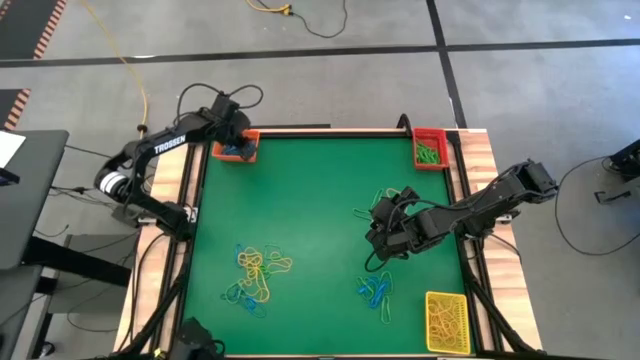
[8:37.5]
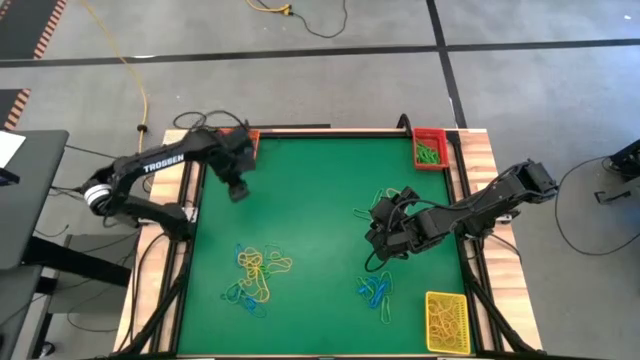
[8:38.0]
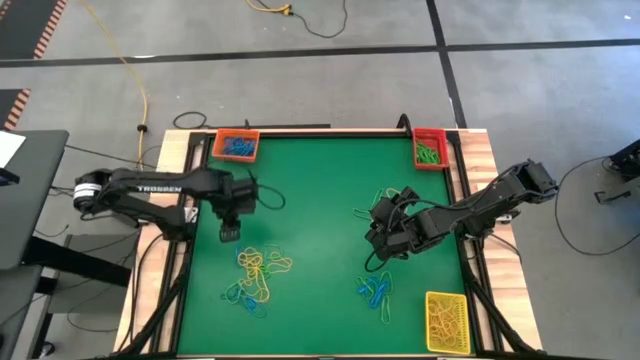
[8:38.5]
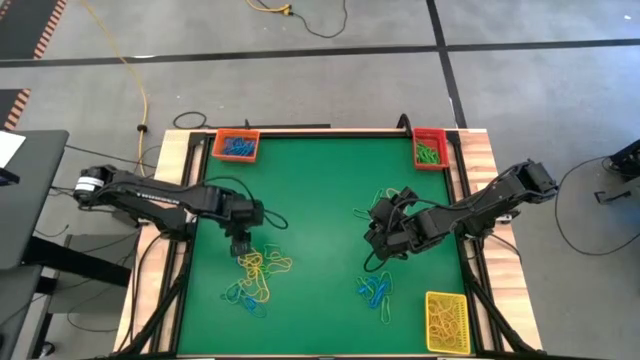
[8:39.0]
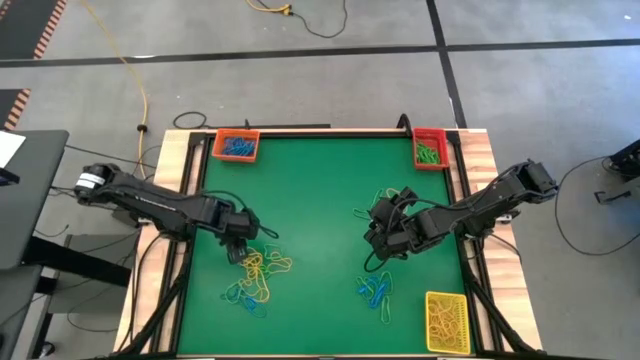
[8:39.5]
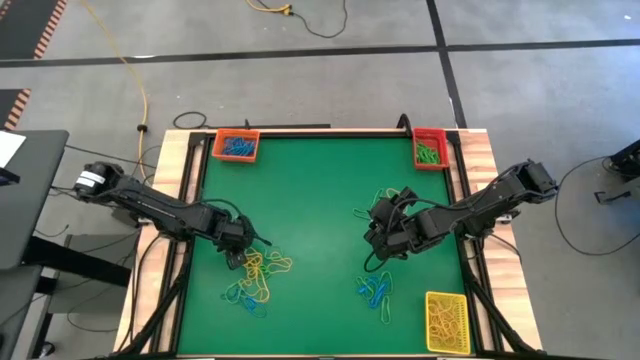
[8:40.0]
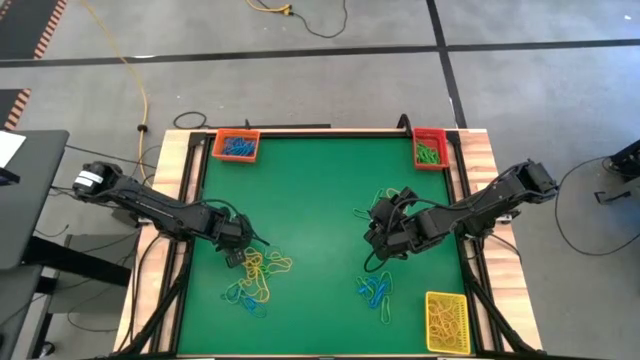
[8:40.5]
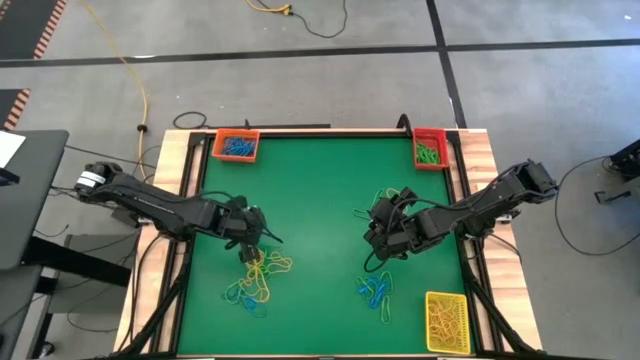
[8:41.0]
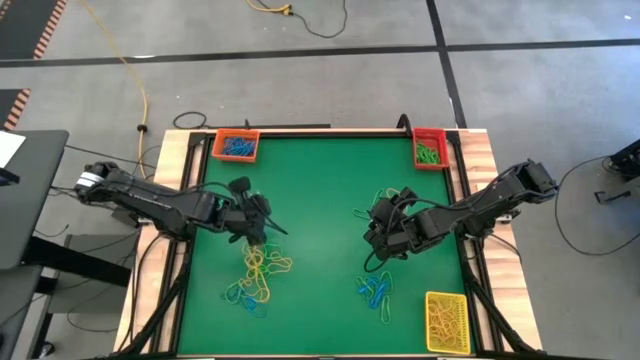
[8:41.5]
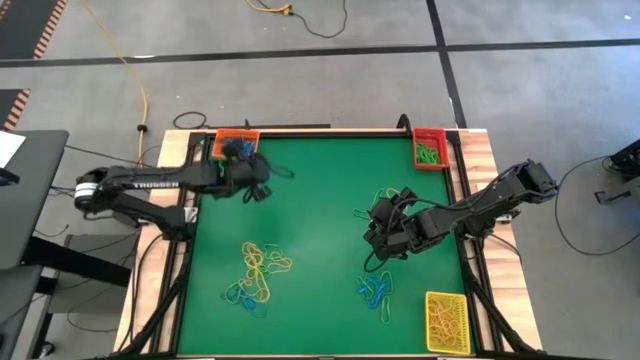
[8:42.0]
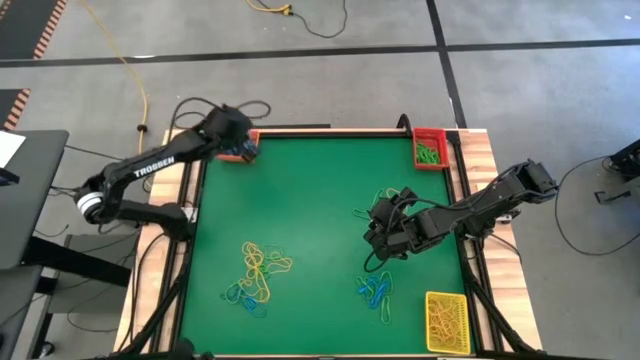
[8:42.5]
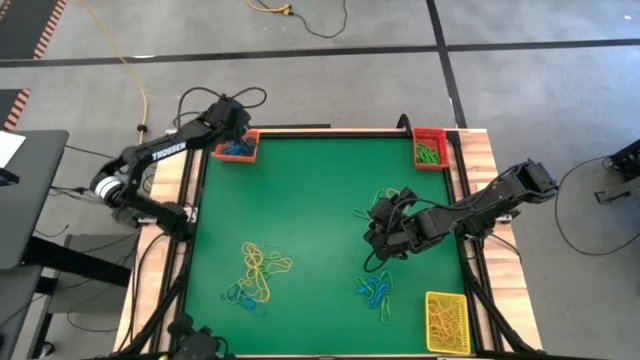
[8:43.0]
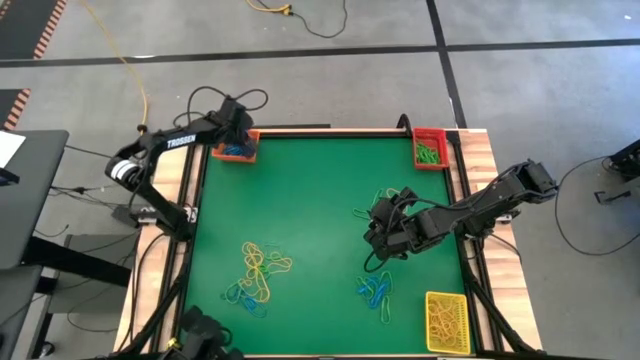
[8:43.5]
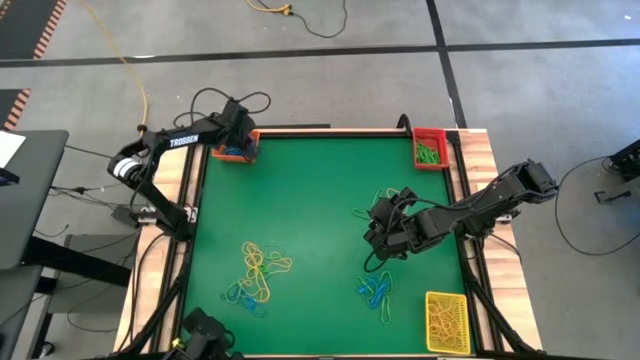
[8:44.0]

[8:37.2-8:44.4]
Task: Sort rubber bands into baskets
Put the bottom left blue rubber band into the orange bin

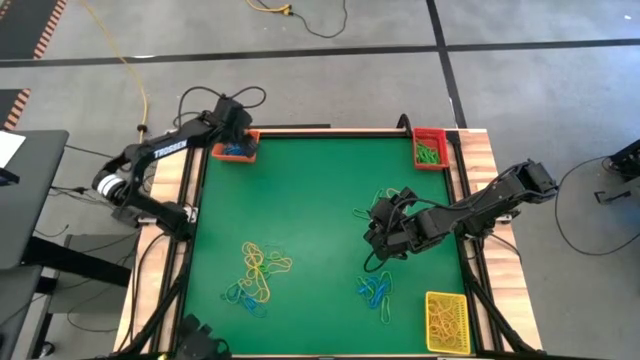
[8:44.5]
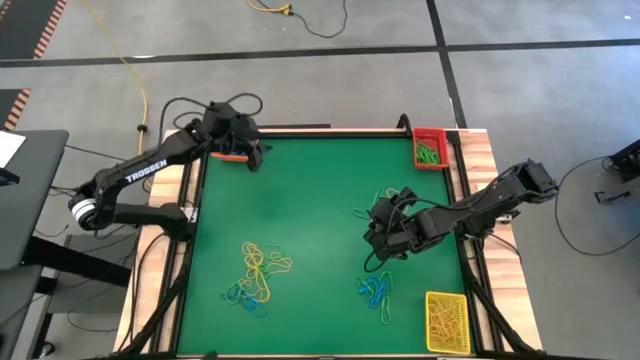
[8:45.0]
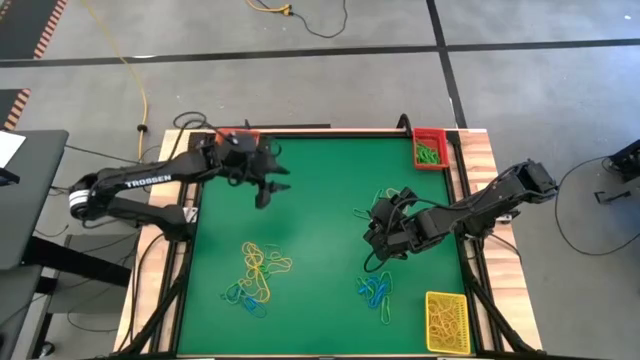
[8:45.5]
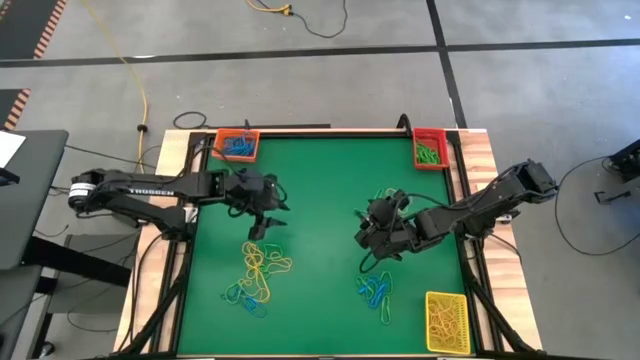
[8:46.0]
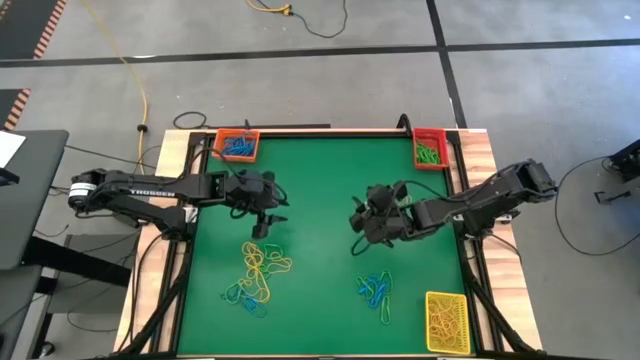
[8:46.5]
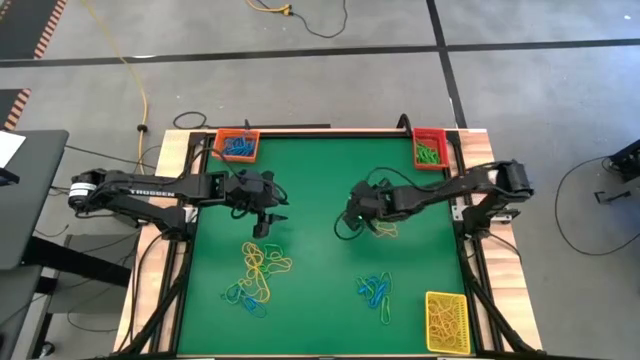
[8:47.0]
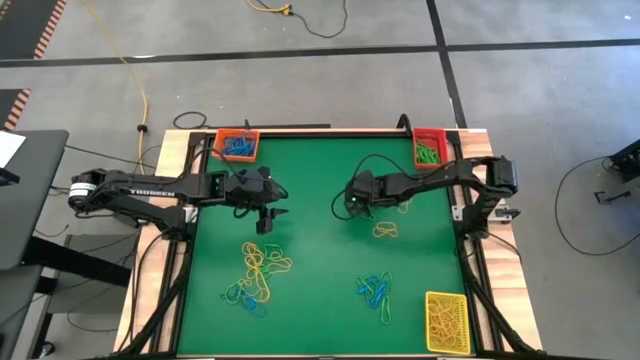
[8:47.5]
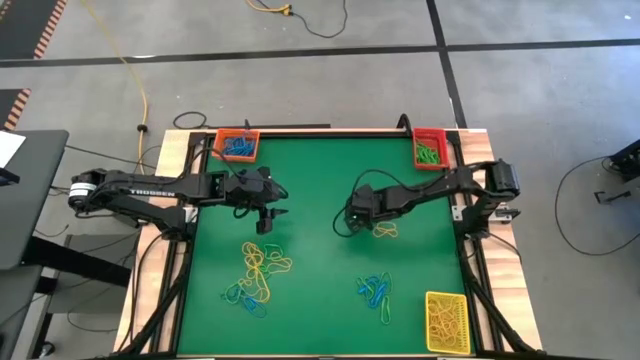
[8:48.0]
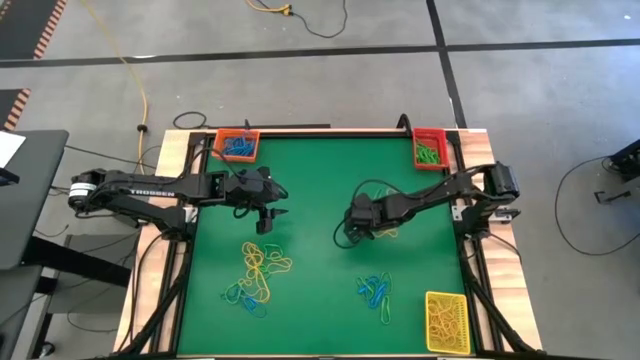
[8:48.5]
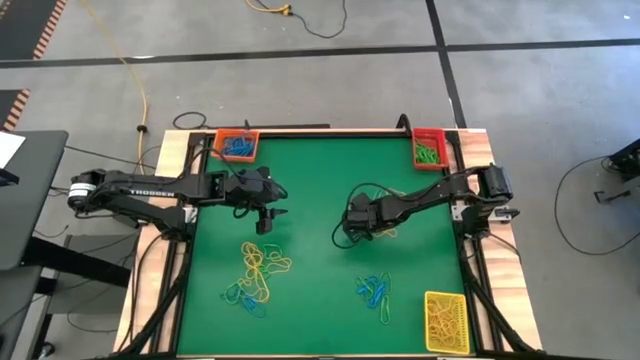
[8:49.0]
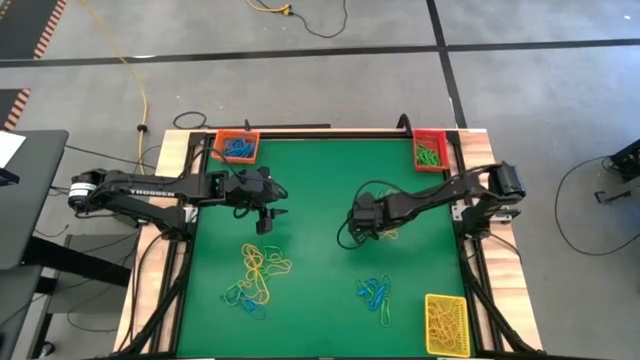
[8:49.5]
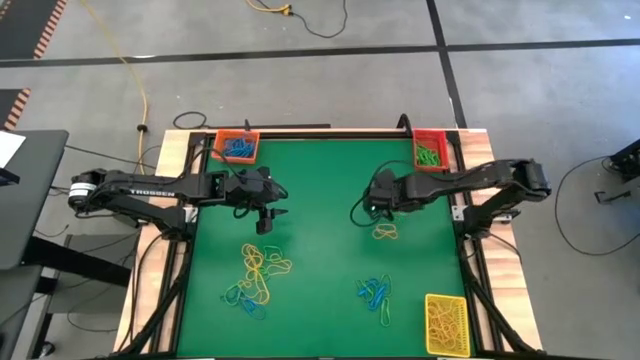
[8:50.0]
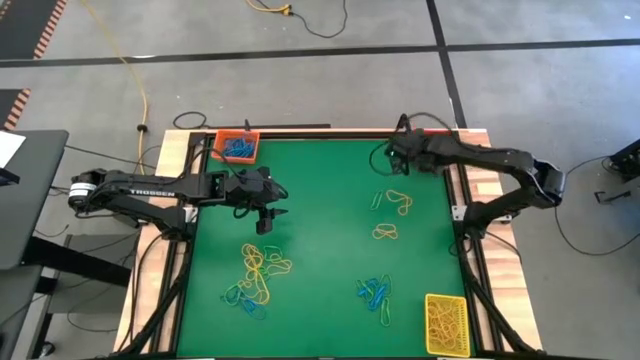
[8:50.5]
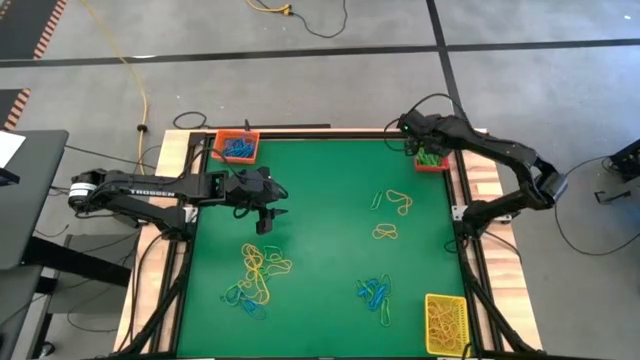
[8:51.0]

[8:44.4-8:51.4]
Put the top right green rubber band into the red bin

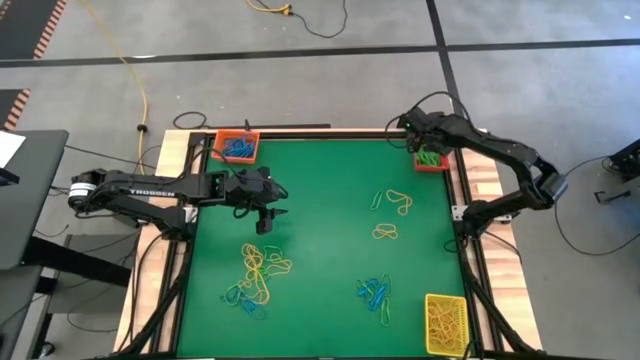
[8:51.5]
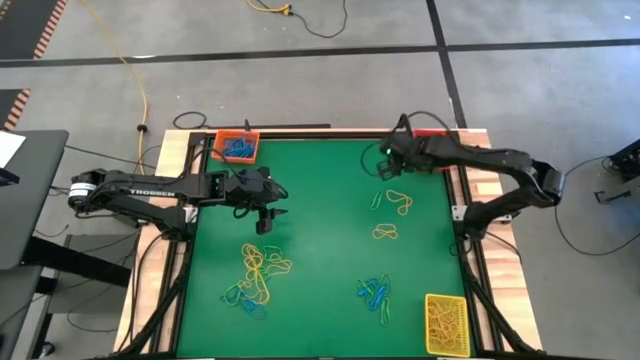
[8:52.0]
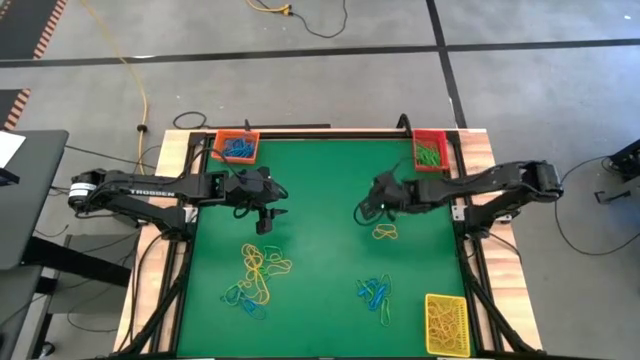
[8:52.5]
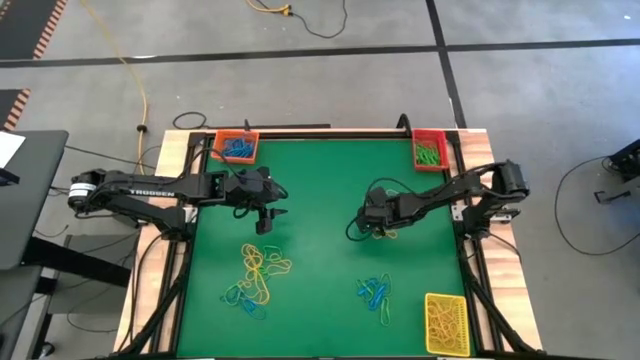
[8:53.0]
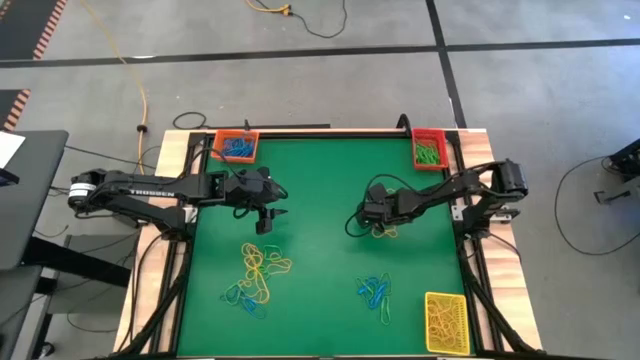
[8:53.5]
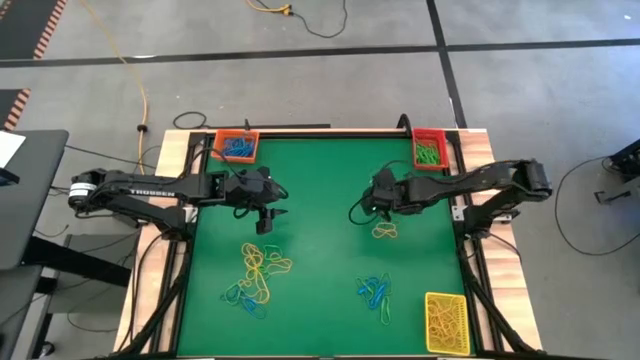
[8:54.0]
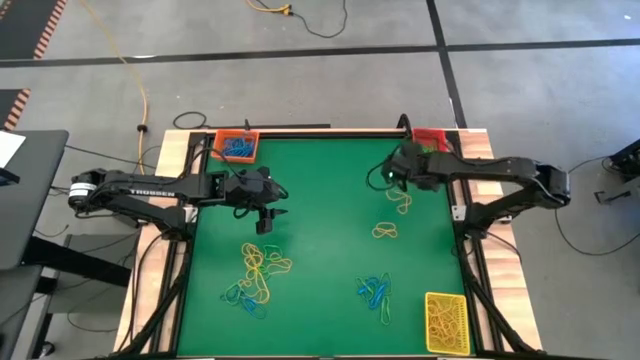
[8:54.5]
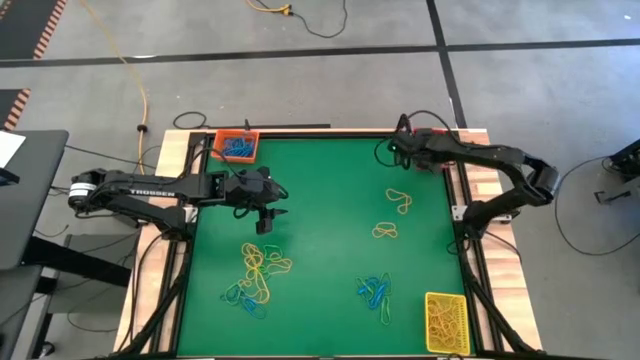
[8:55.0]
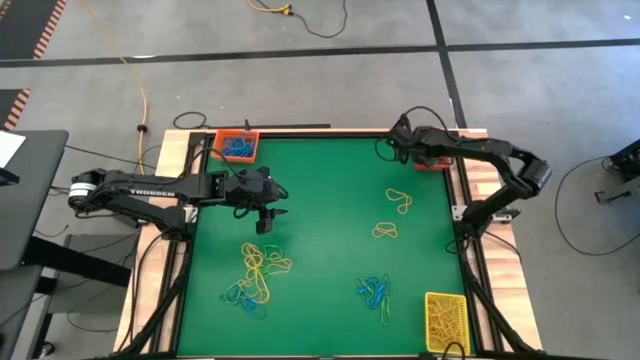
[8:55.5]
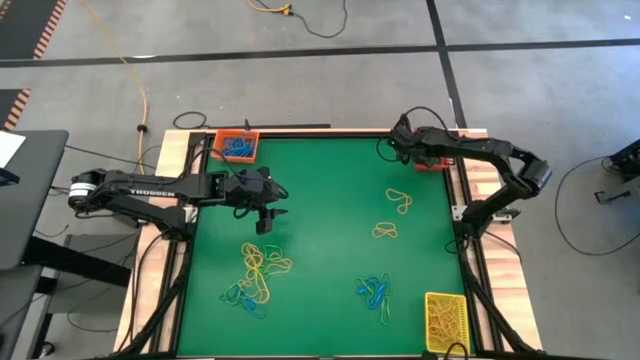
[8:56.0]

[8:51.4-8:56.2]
Put the top right green rubber band into the red bin
